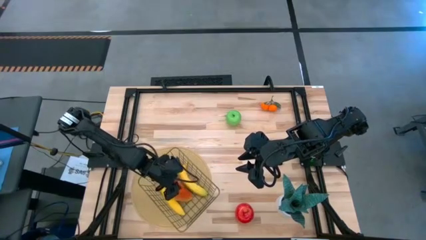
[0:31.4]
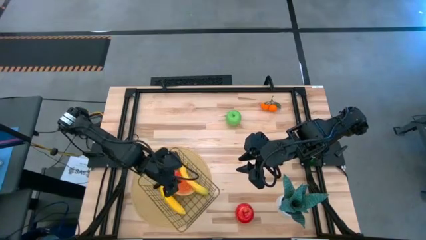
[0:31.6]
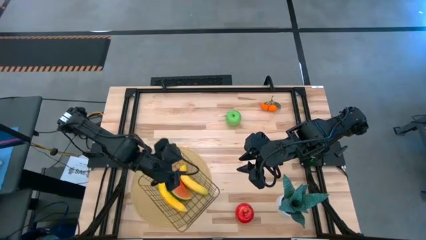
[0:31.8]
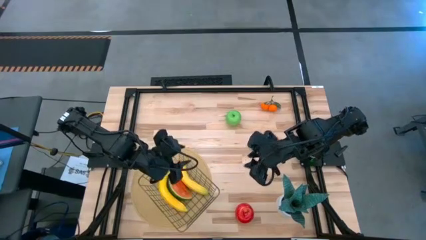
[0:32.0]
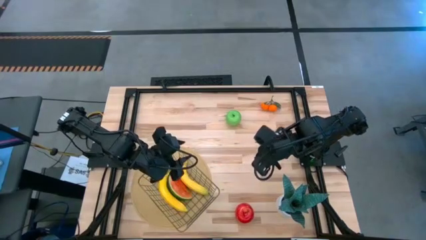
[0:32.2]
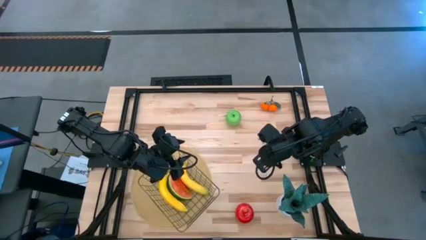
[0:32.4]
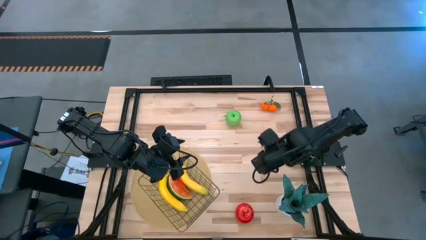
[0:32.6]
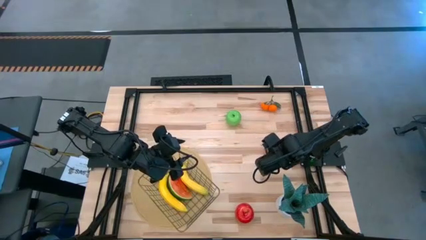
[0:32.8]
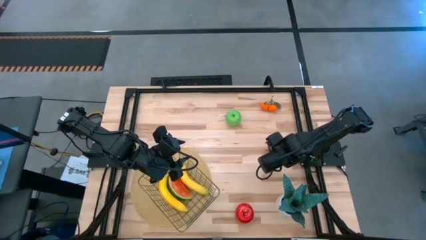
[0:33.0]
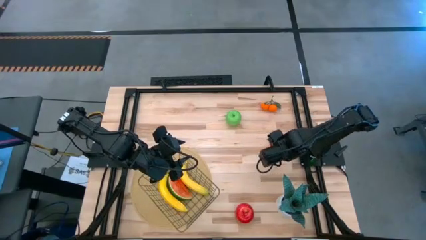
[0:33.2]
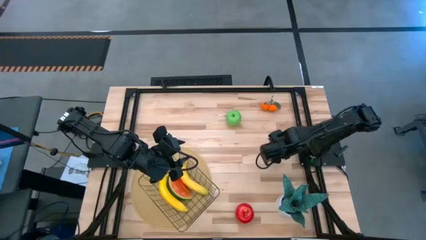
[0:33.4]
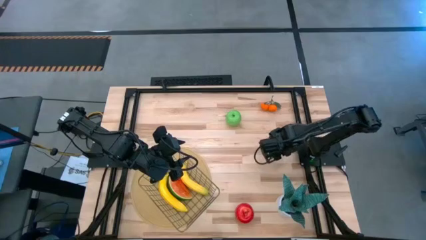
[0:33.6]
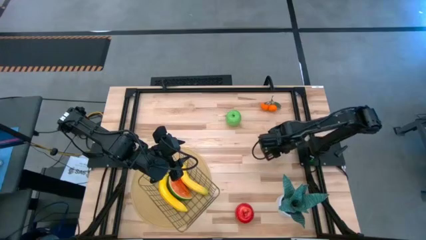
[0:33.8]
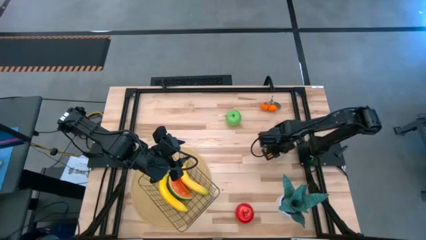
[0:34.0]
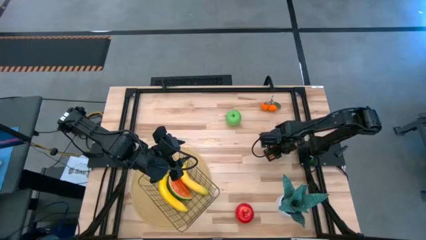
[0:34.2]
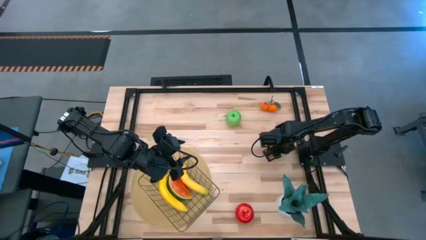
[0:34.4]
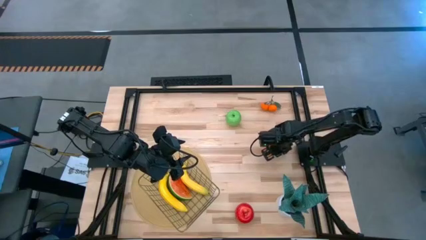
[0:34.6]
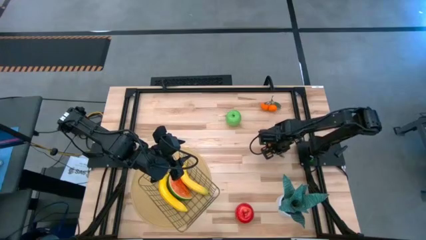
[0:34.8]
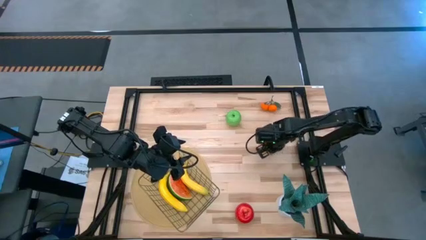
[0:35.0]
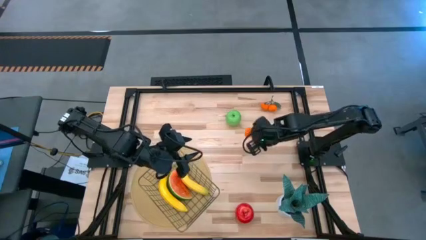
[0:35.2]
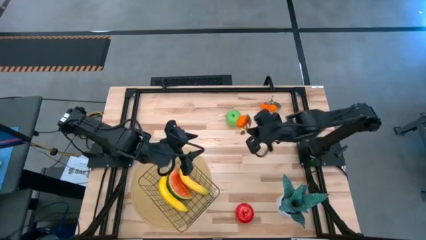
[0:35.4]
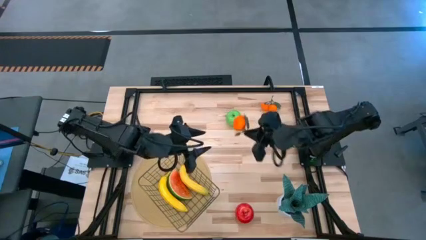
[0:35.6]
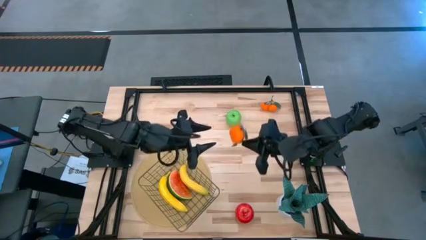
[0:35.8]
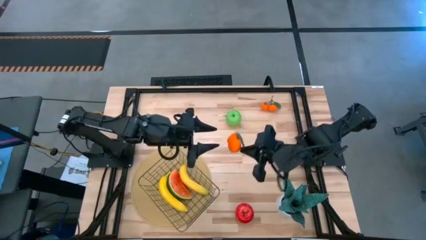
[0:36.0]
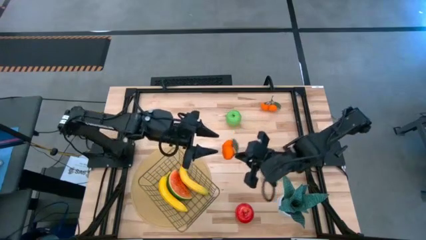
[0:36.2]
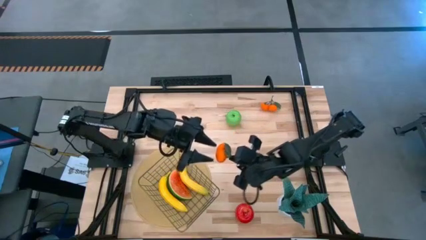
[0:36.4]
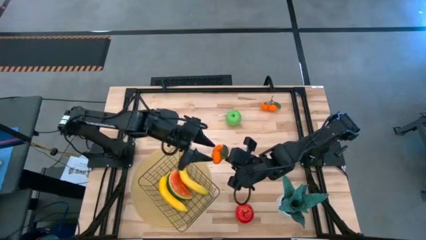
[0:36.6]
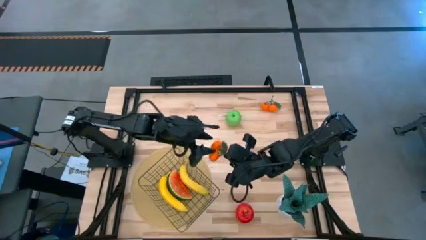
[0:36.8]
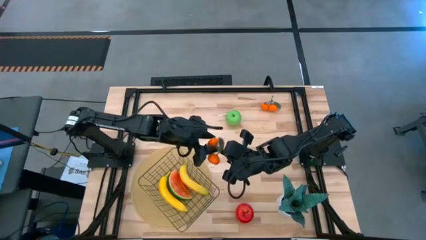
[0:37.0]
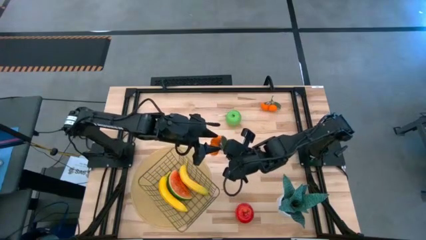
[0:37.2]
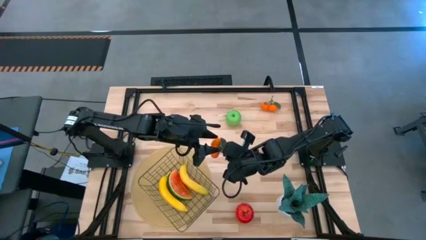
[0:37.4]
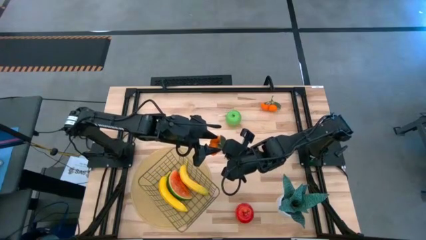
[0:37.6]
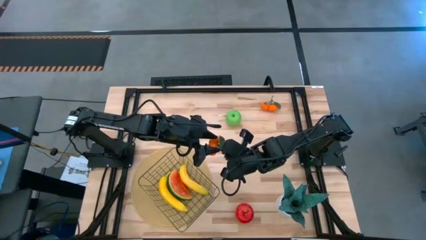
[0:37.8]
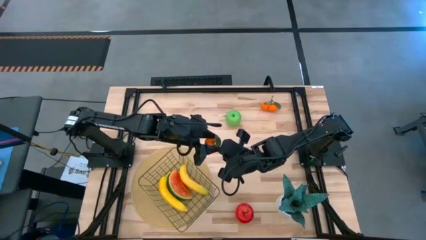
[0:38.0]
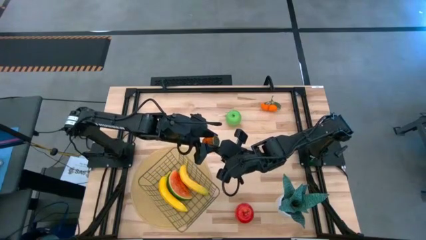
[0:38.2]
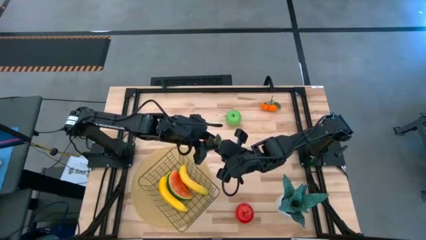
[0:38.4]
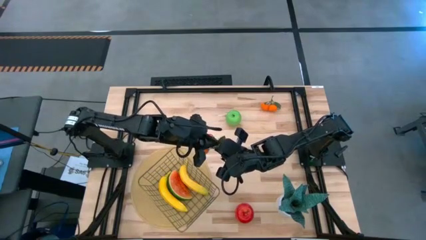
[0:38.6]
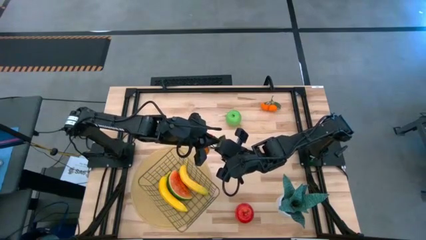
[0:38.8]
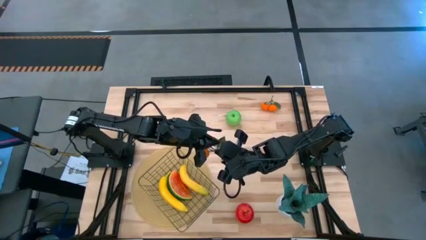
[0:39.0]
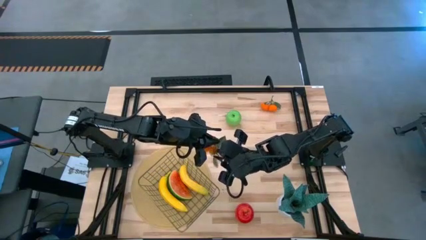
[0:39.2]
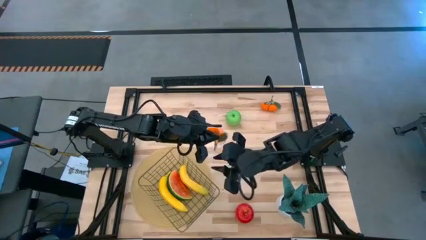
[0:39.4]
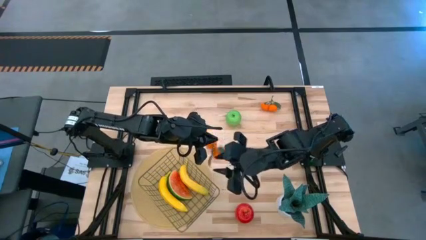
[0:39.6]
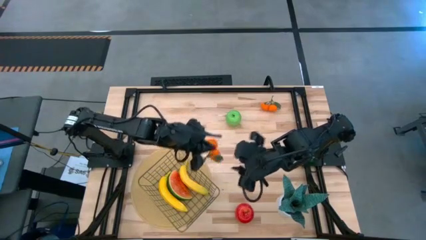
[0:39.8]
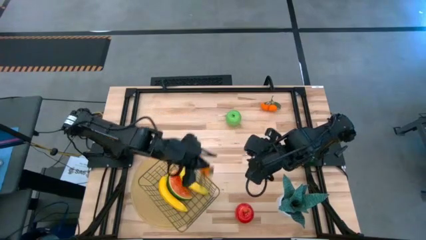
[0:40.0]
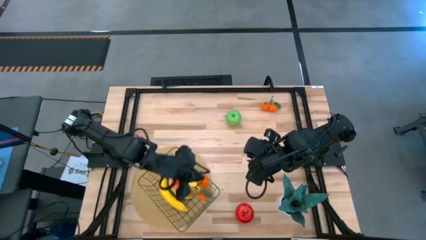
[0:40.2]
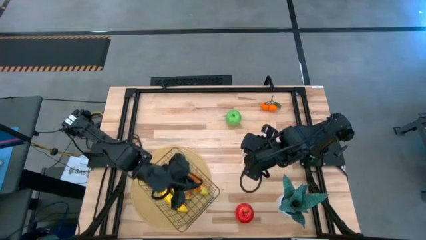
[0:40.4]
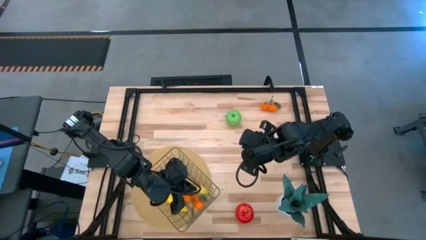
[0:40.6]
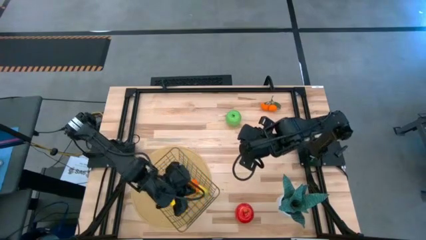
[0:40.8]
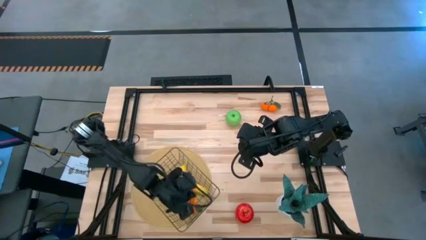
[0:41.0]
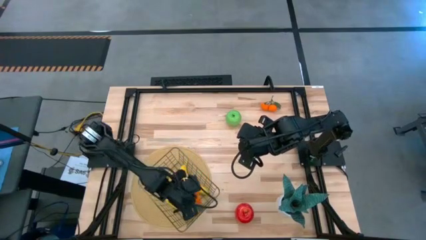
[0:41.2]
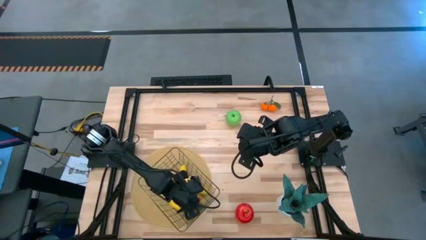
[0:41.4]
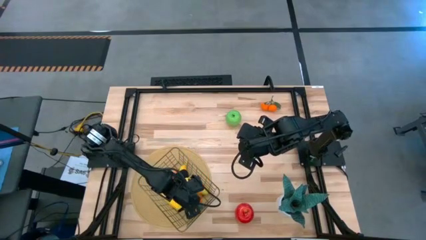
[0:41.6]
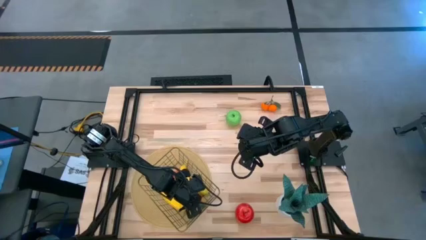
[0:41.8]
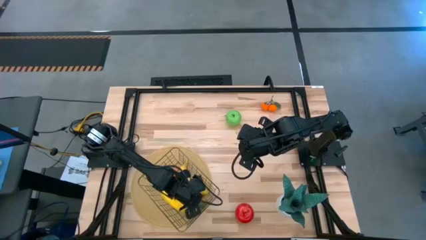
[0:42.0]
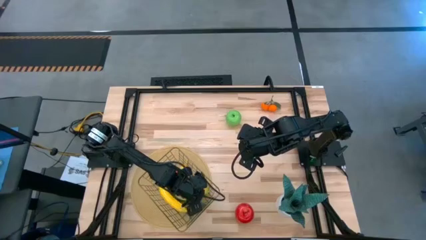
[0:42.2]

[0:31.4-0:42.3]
Task: Build produce basket
Put the bottom oranges into the gold wire basket

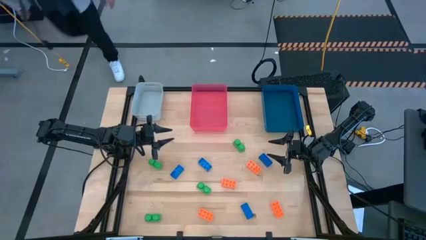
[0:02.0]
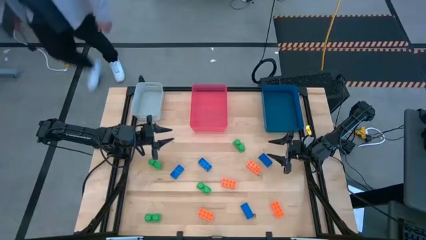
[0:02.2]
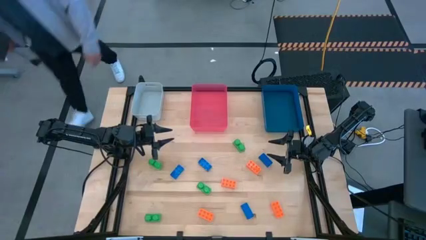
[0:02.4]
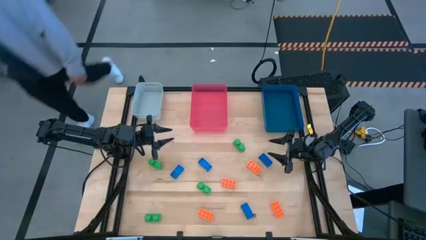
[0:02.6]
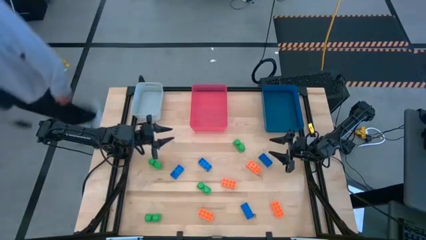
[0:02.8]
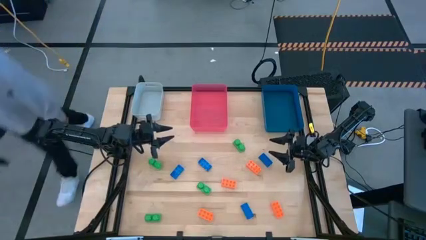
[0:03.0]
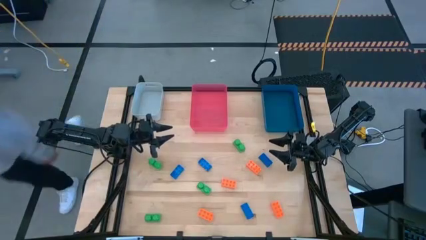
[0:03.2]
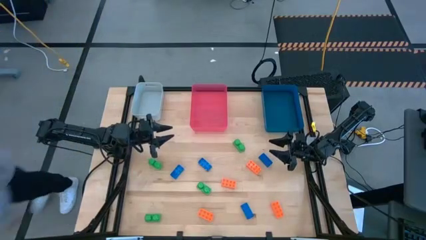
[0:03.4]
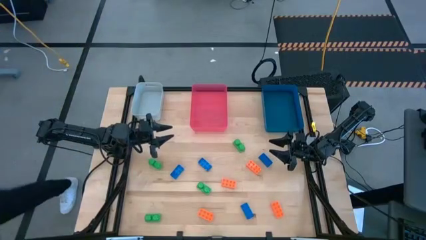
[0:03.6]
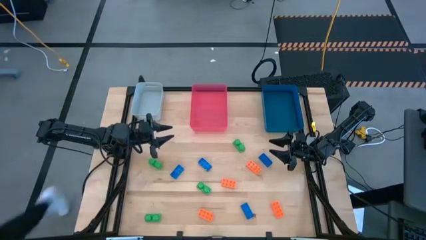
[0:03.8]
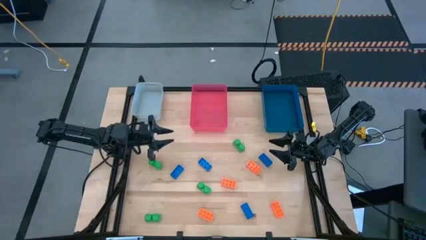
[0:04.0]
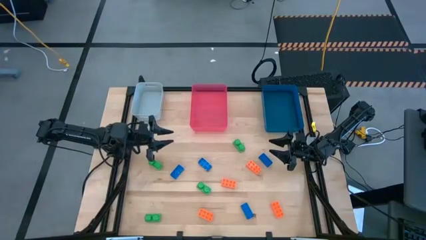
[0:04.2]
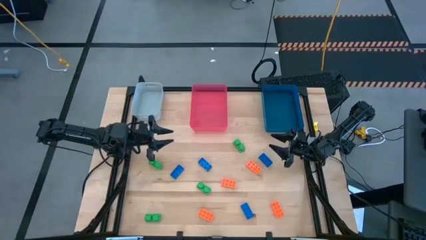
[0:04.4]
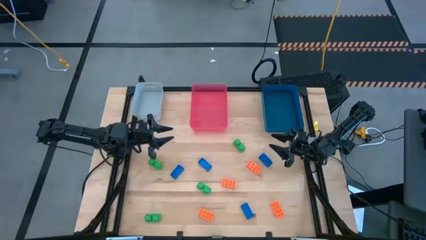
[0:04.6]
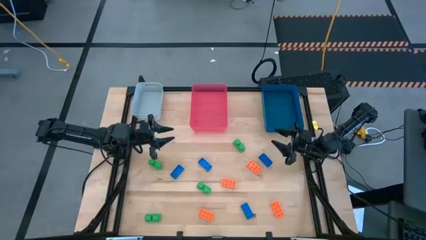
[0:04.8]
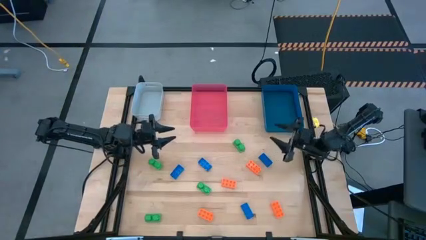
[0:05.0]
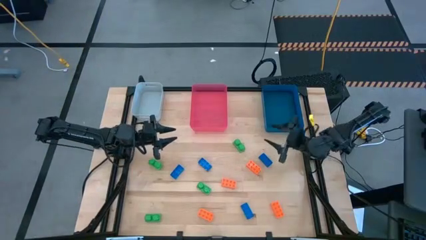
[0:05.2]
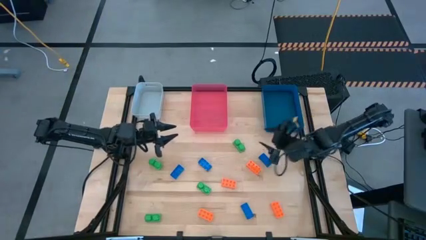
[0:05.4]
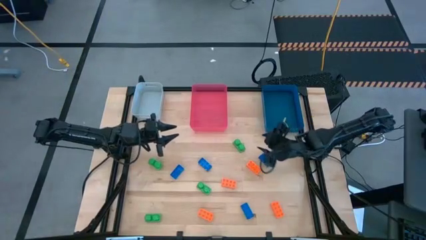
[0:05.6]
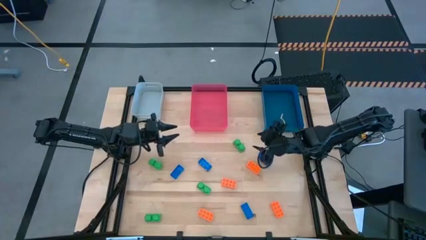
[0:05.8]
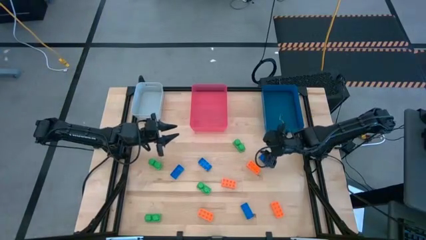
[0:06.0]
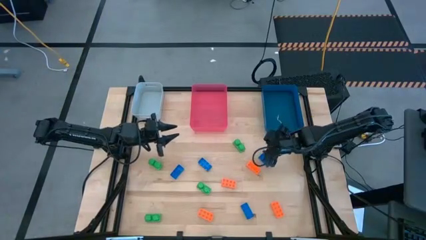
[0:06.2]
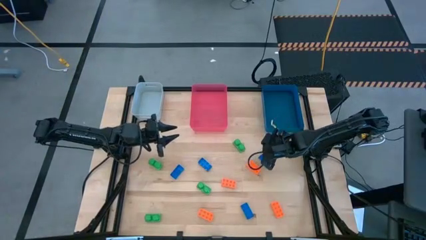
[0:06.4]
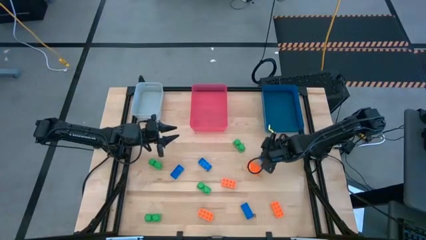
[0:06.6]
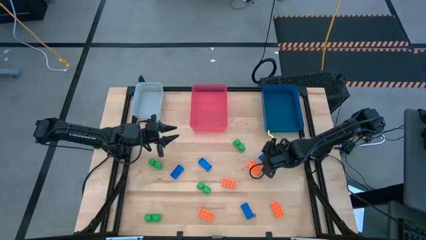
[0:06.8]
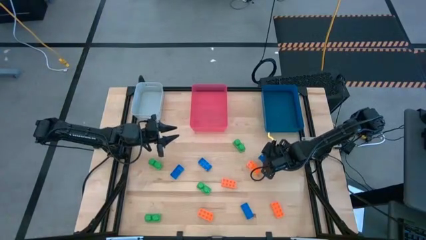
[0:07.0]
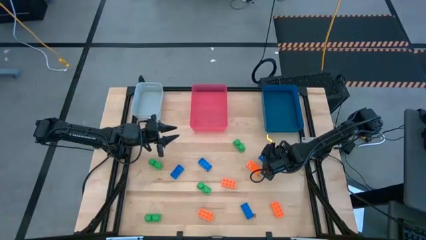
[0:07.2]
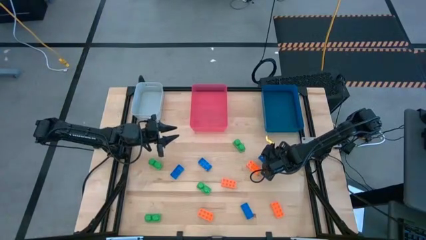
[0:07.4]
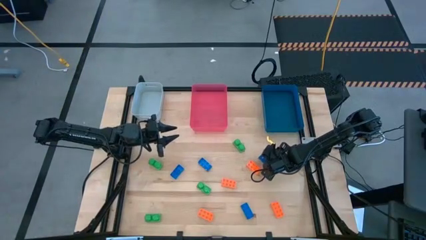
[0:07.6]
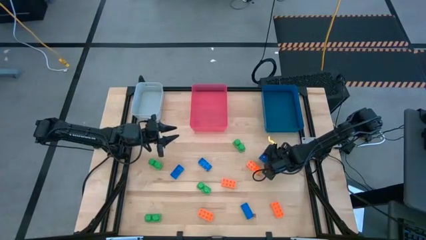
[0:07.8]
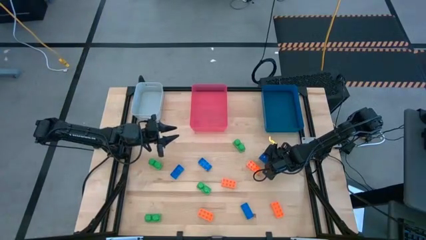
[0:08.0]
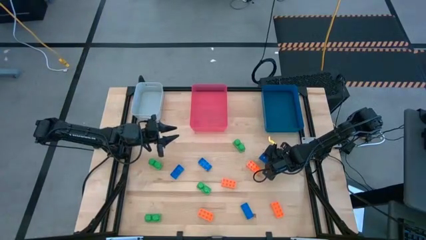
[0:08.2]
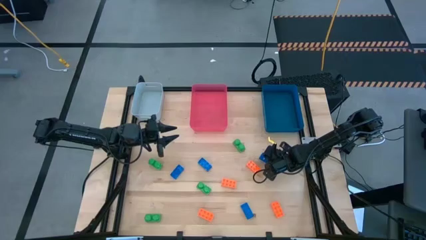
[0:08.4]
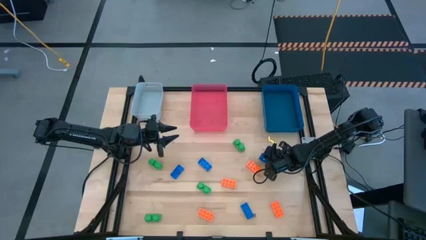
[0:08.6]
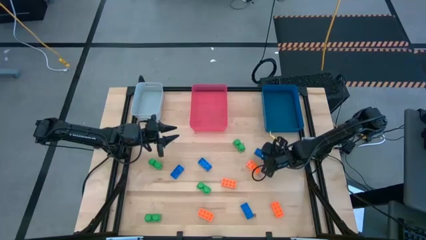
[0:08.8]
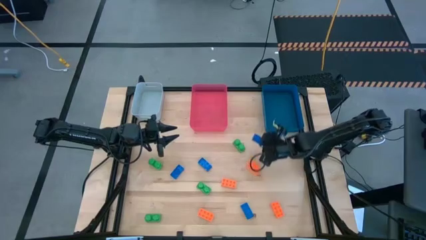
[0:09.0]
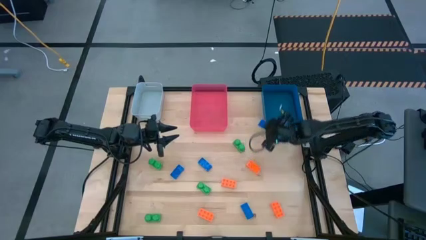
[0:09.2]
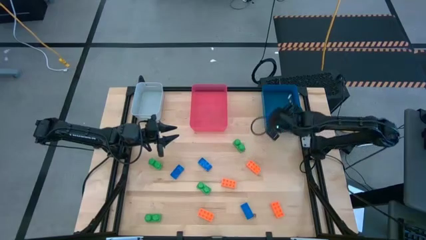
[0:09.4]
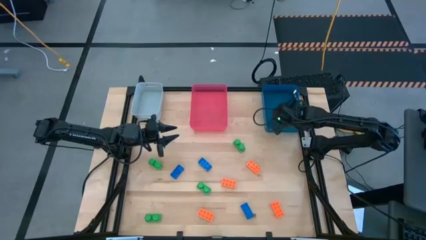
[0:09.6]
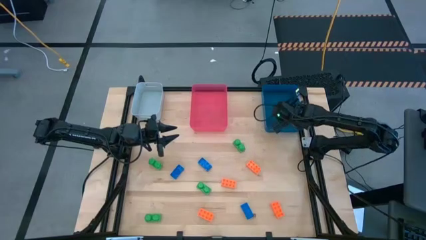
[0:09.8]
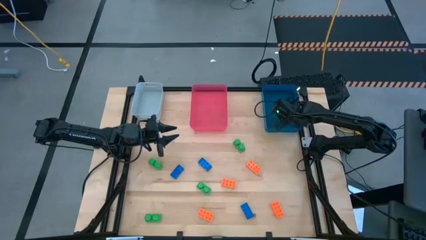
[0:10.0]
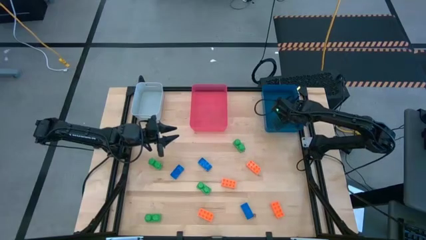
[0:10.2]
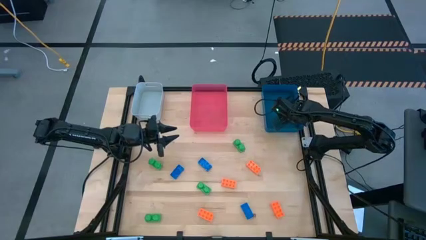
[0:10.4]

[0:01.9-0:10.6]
Task: Sort & place blocks by color
Put the blue game piece into the blue bin
